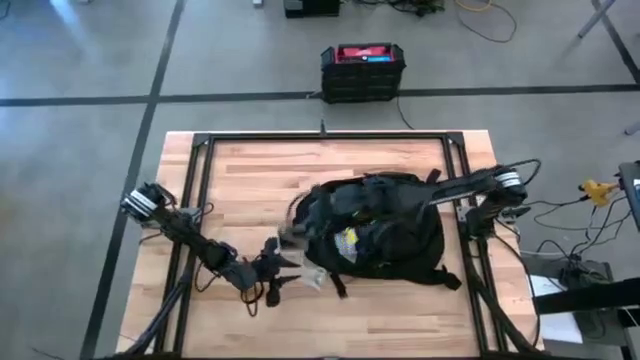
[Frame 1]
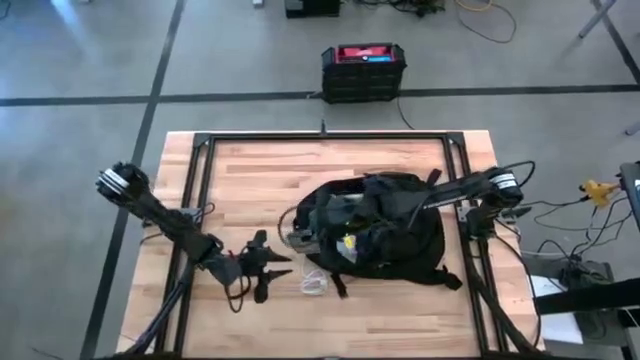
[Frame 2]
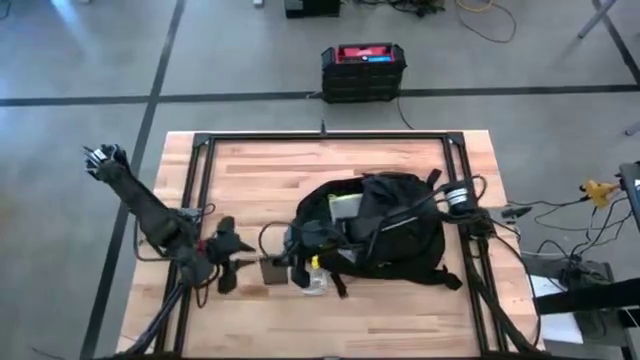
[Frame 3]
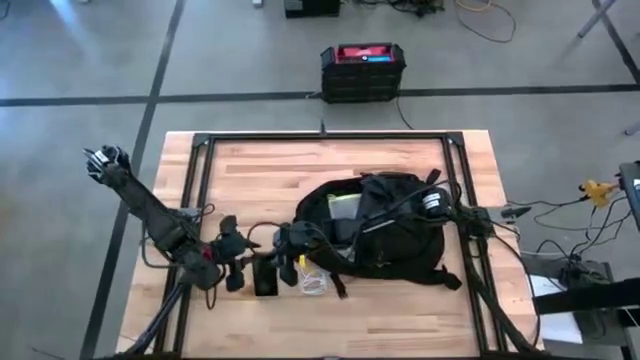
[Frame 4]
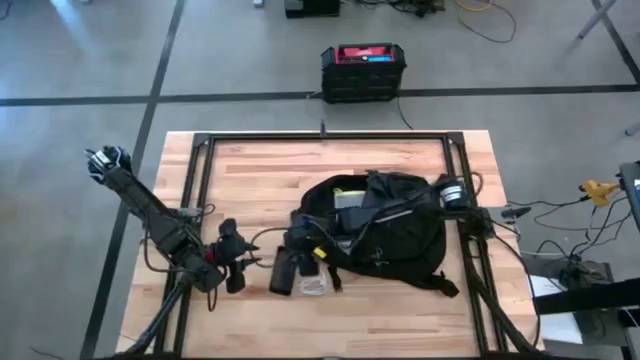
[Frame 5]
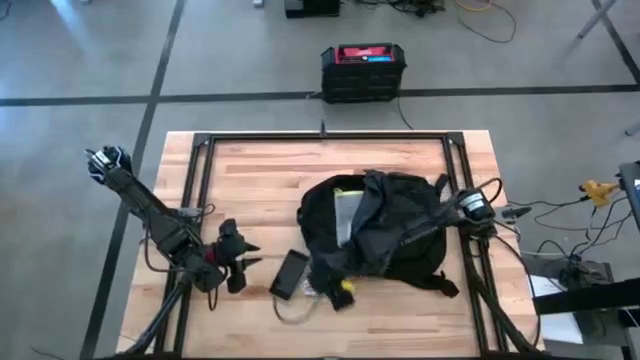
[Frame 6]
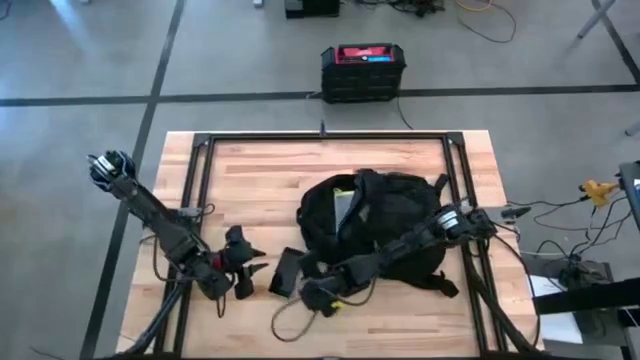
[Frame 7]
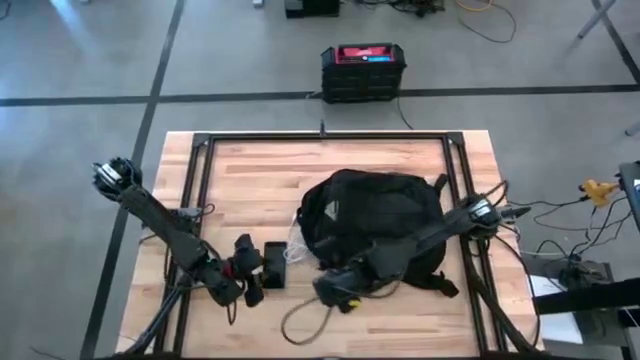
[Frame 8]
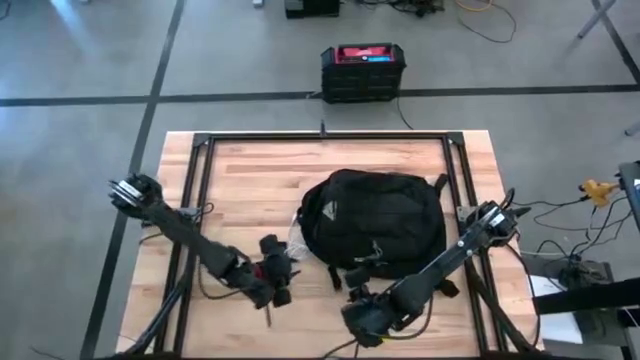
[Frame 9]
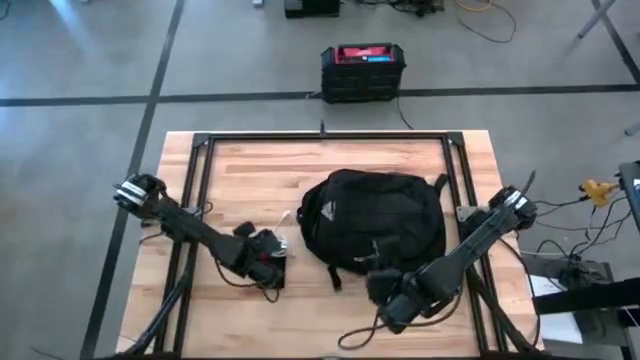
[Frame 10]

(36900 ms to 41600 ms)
Task: Unpack backpack
Remove the black phone from the black backpack

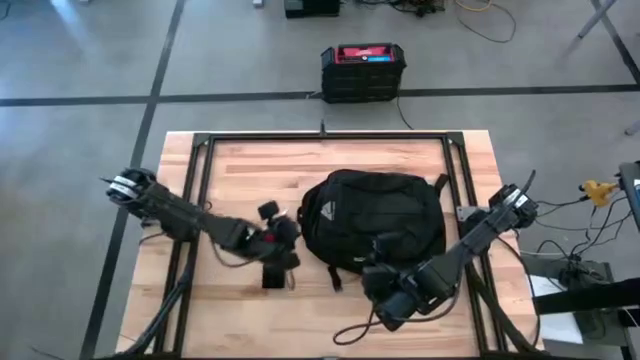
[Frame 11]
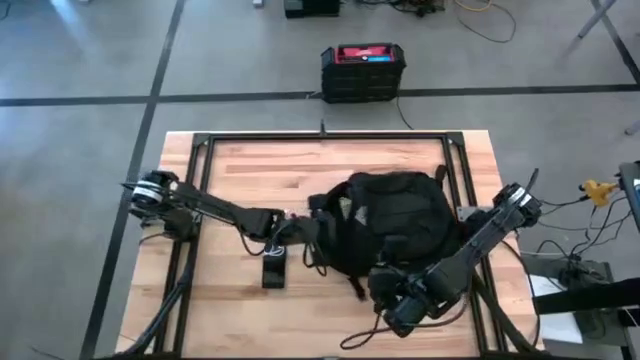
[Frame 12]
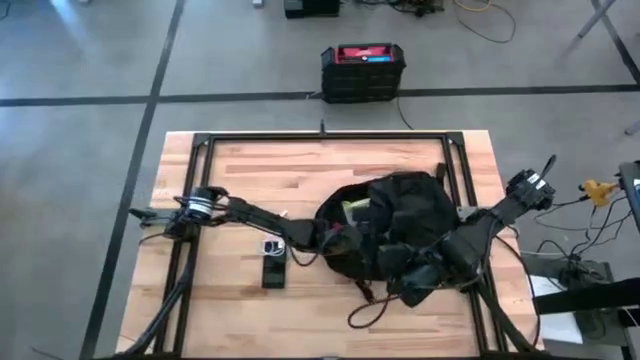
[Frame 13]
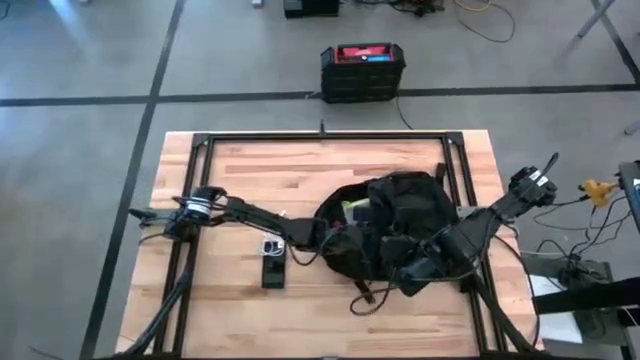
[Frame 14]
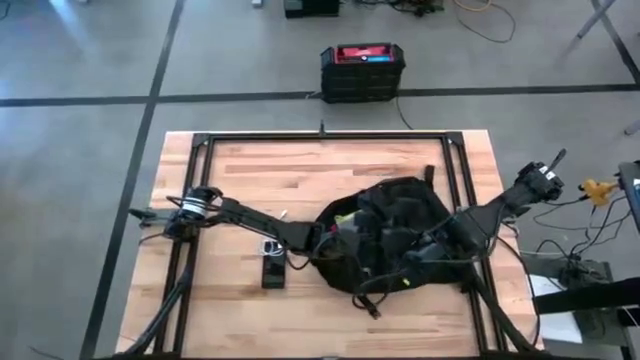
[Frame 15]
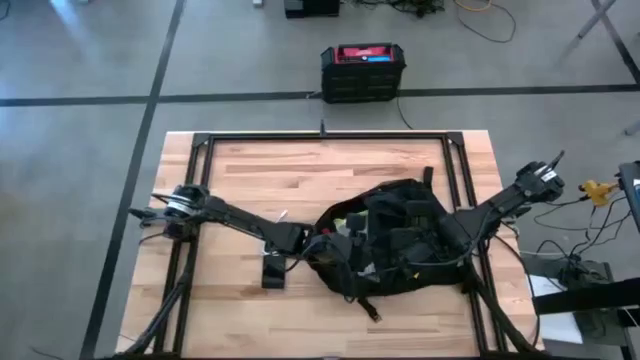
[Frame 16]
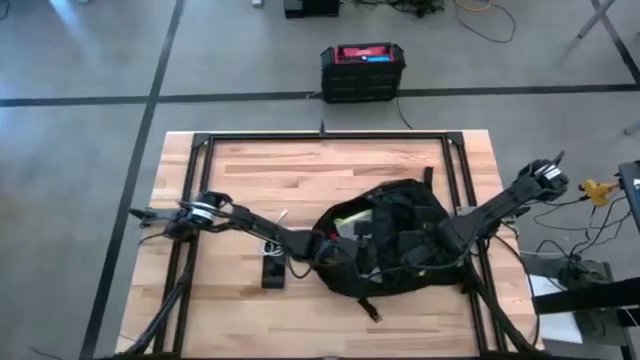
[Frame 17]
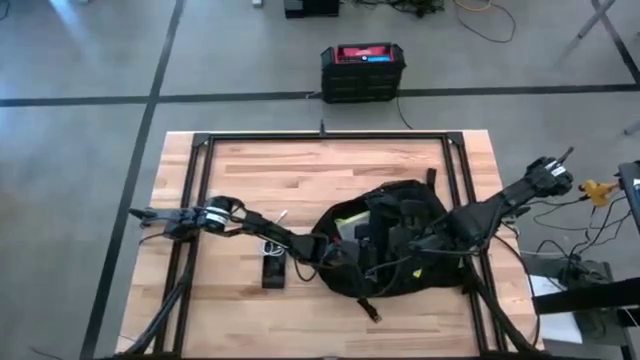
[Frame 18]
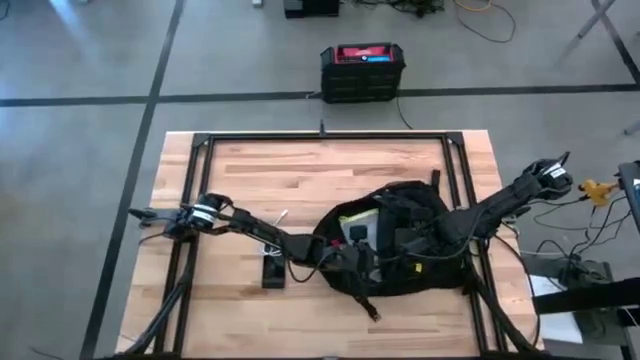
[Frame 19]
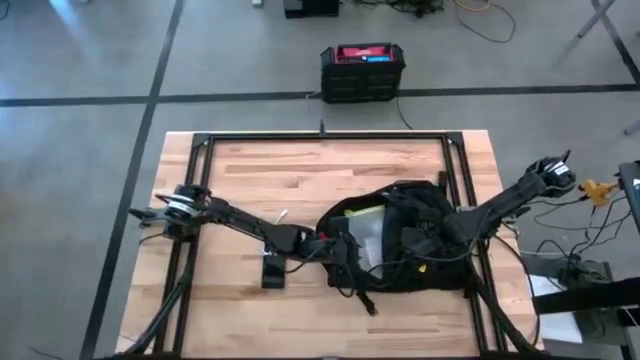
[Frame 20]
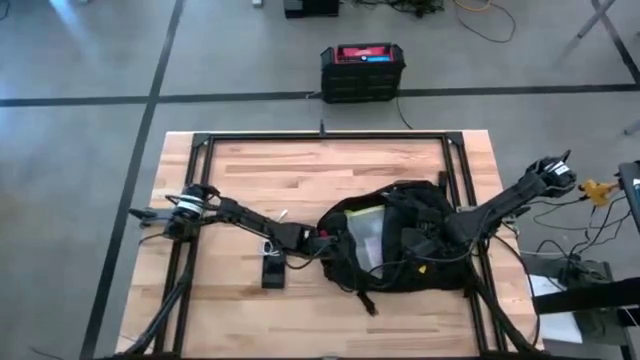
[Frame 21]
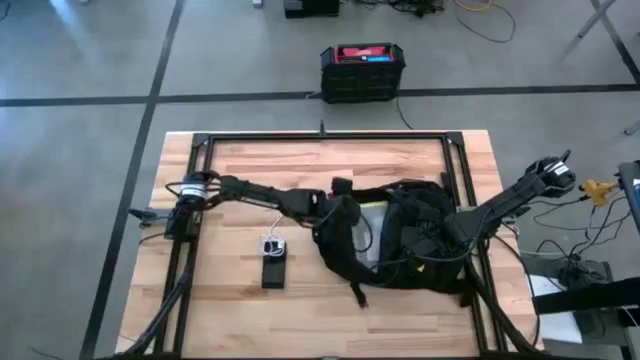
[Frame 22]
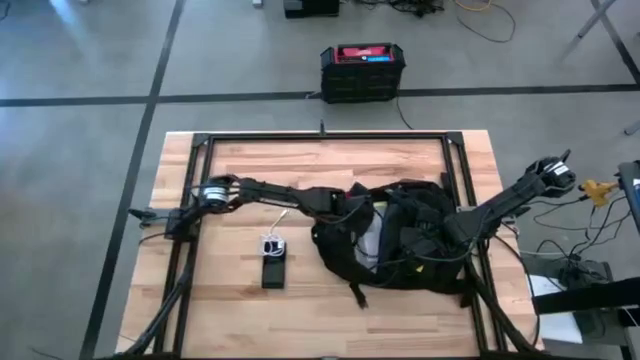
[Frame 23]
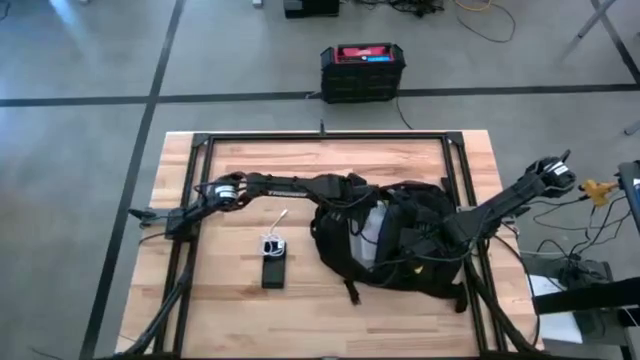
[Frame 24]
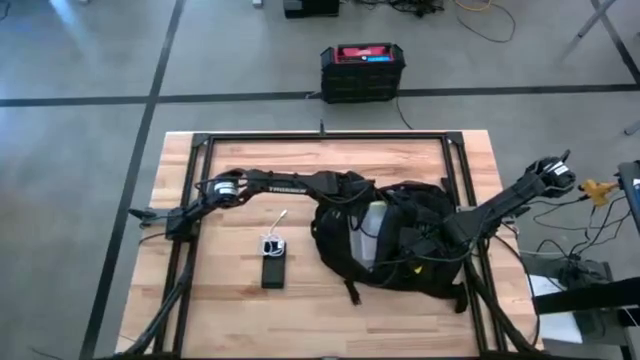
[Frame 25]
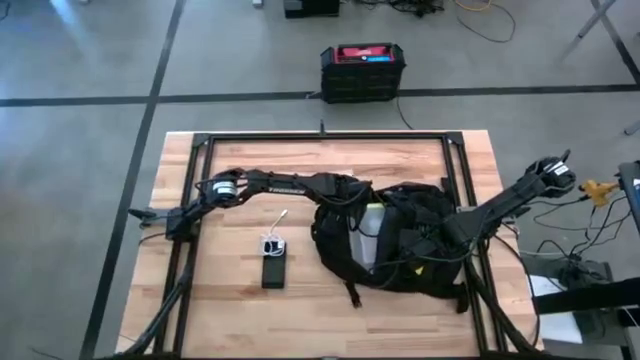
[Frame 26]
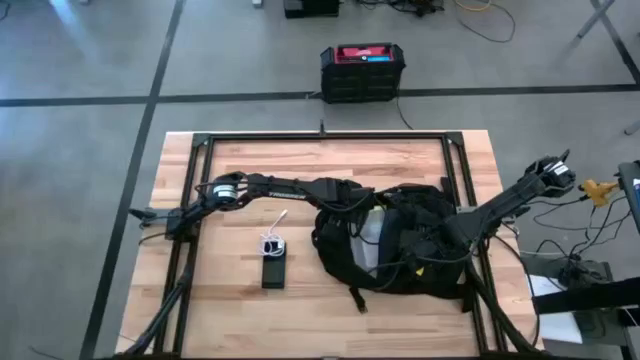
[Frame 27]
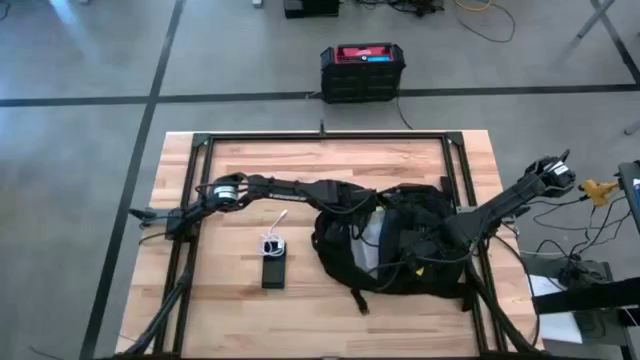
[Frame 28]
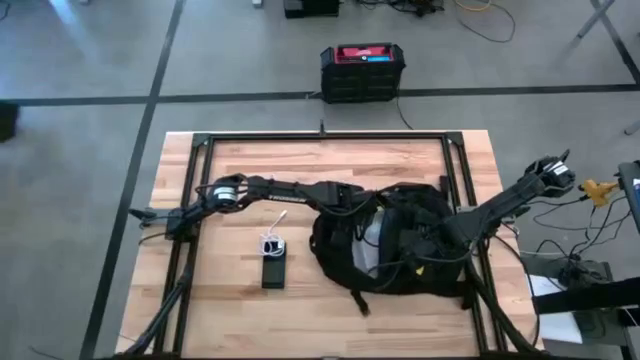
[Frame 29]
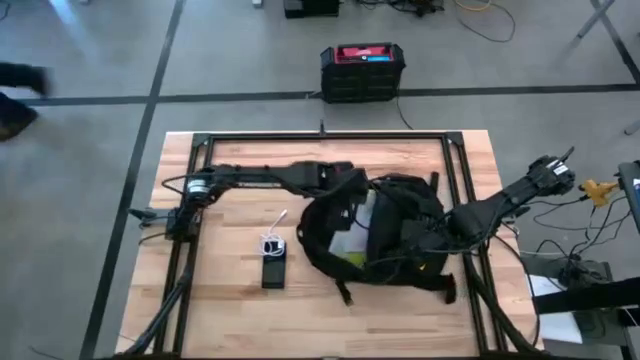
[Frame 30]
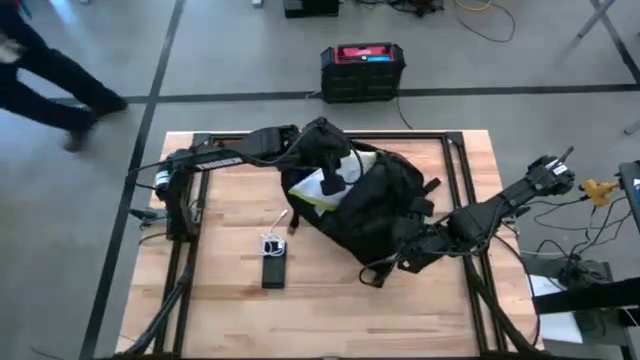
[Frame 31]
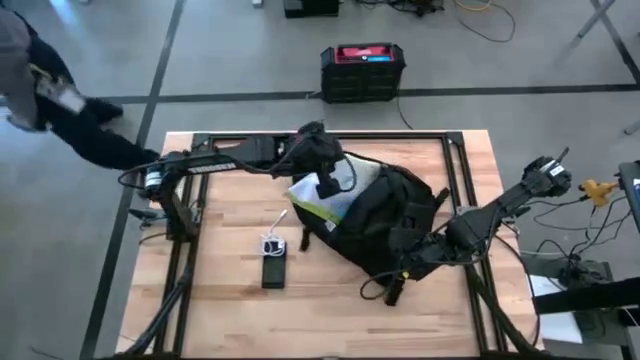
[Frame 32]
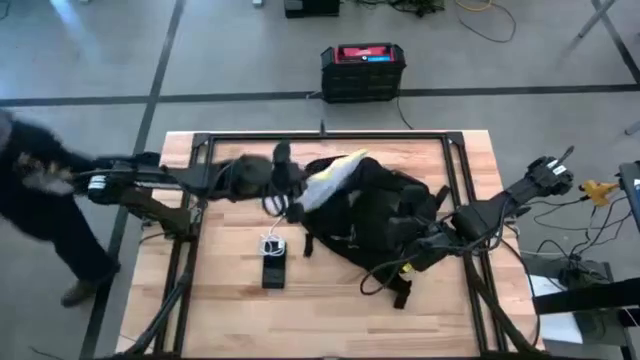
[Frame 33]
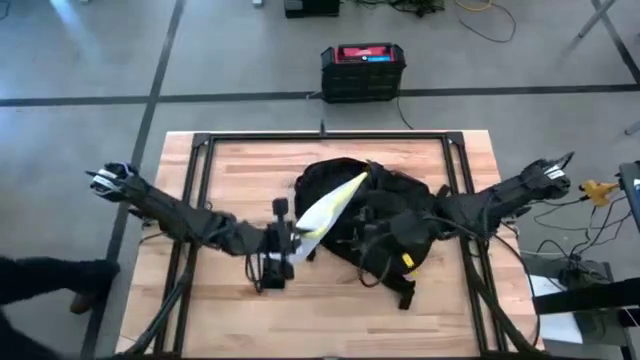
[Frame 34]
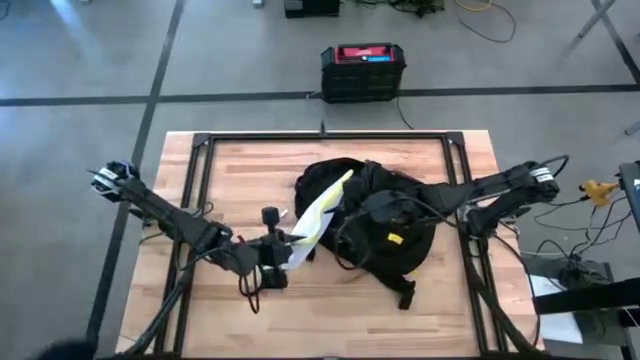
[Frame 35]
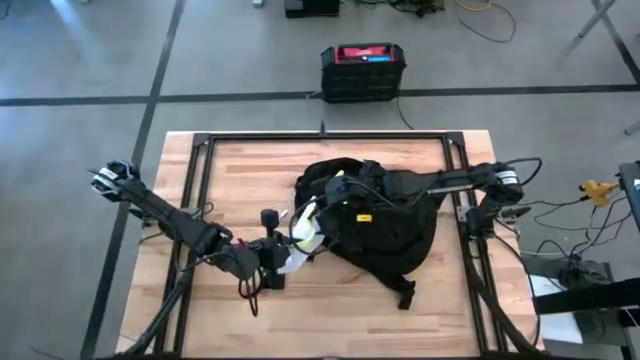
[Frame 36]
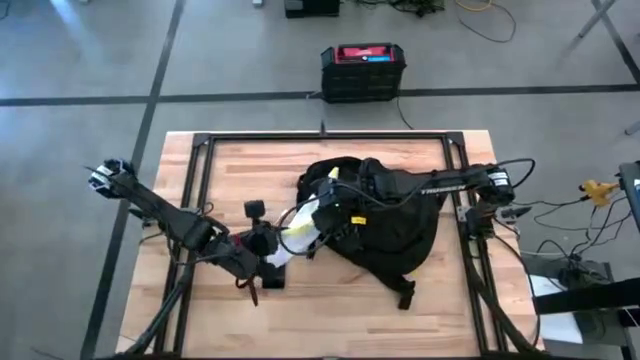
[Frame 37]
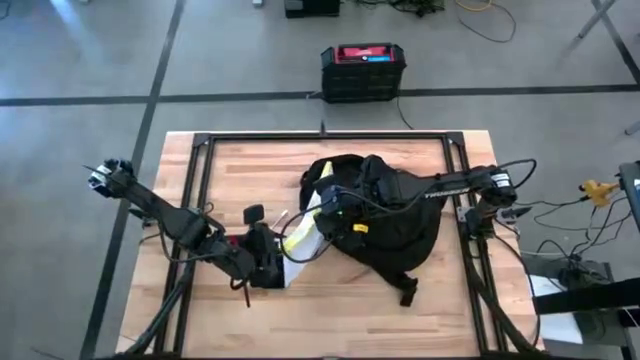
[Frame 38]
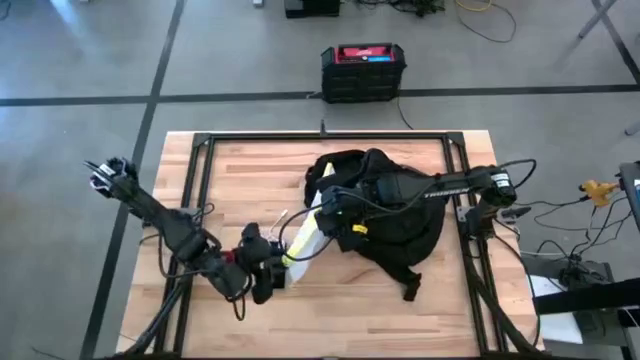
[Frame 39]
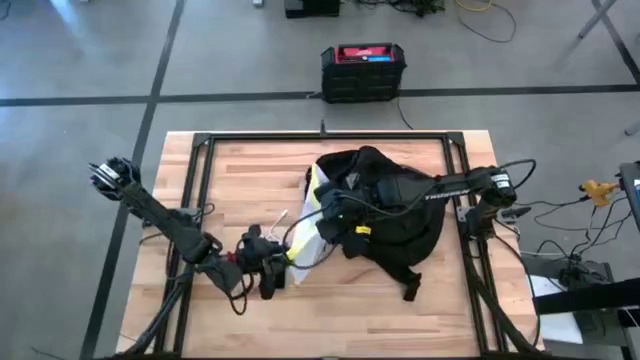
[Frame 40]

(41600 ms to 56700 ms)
Remove the yellow green zip bag from the black backpack

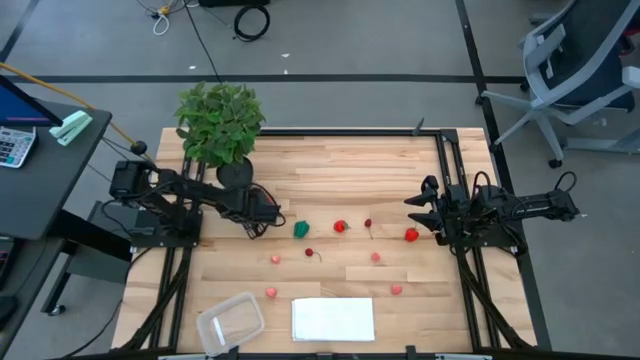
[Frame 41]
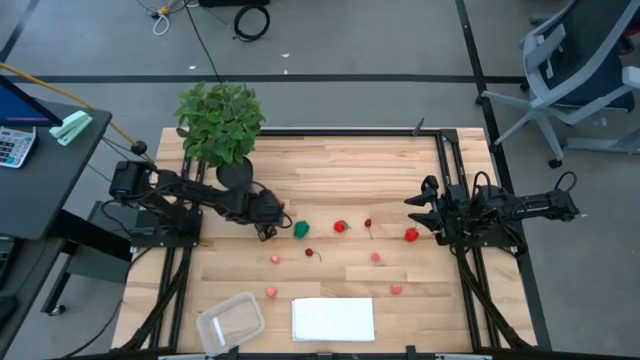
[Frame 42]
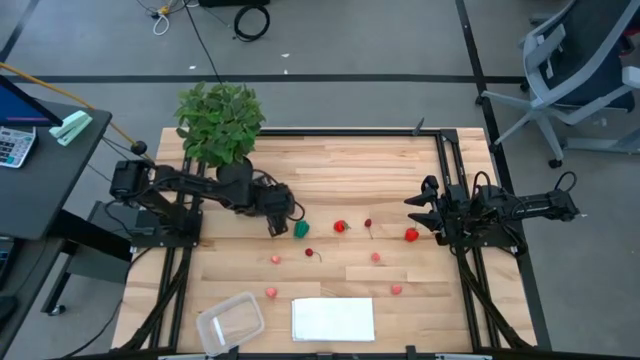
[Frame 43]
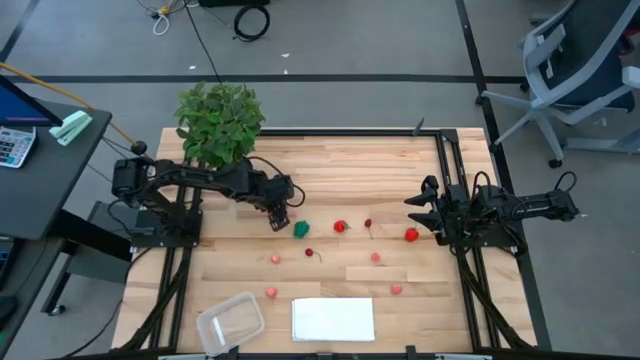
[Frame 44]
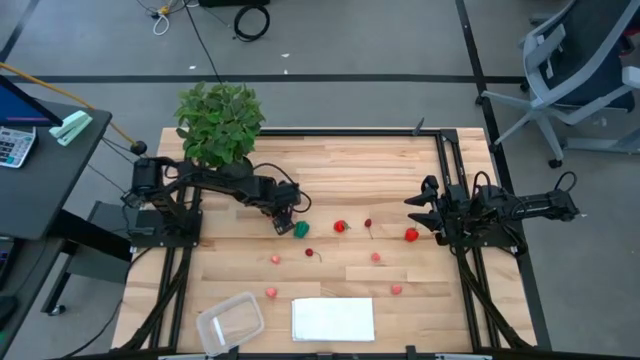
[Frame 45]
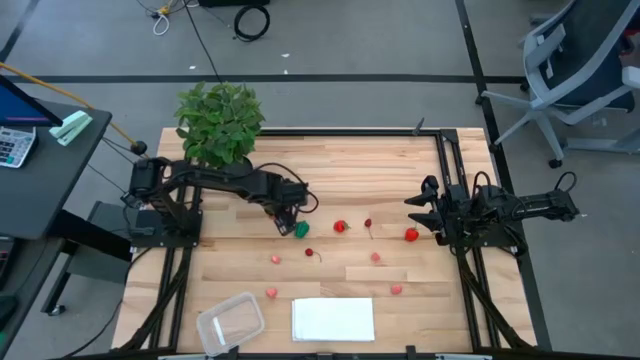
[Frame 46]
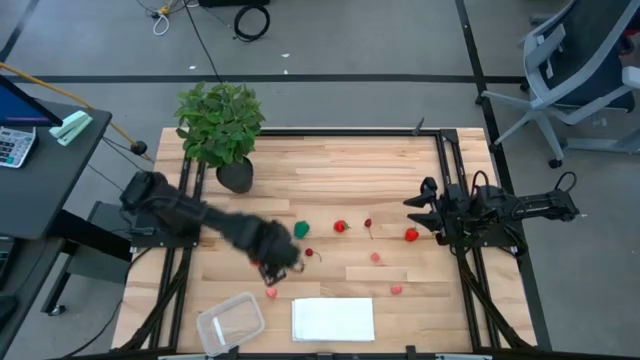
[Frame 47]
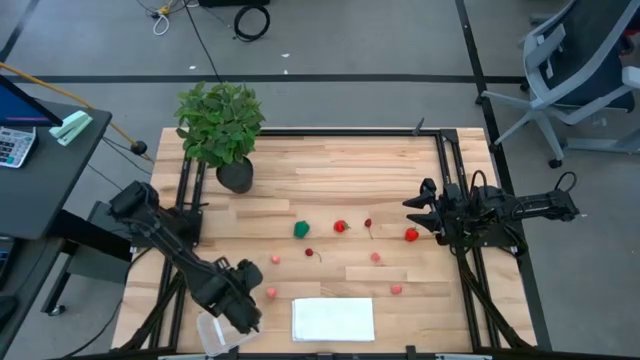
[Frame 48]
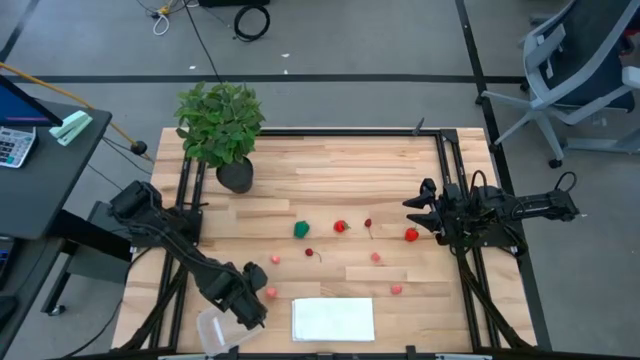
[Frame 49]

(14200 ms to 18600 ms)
Task: Pick and placing Produce into tupperware
Put the red dragon fruit into the transparent bin
